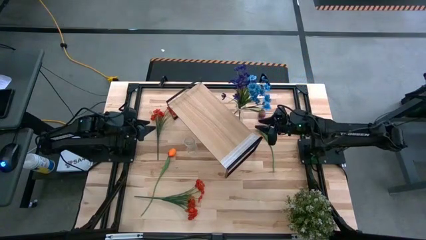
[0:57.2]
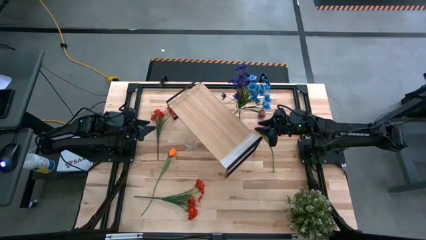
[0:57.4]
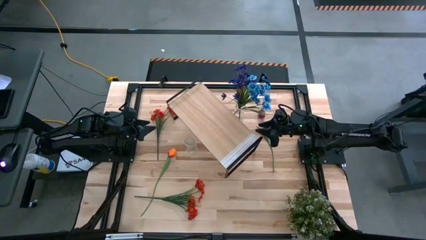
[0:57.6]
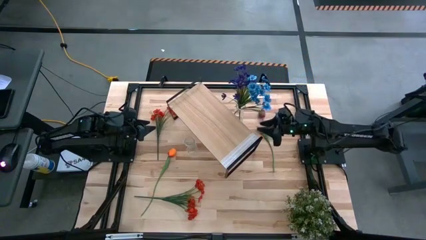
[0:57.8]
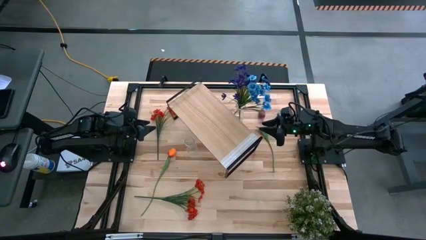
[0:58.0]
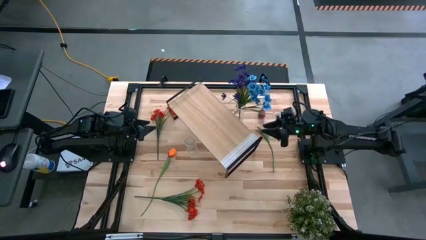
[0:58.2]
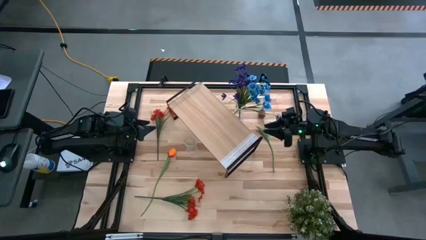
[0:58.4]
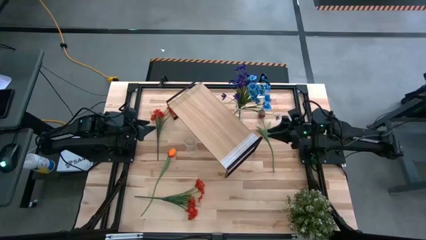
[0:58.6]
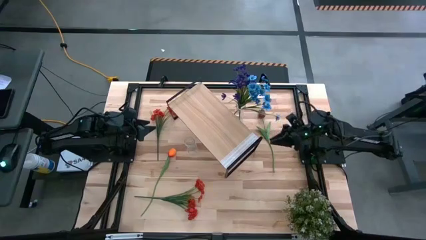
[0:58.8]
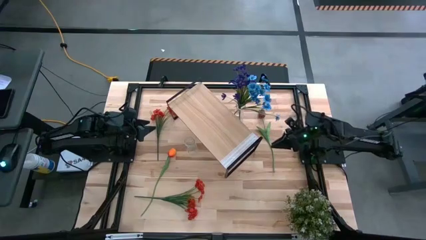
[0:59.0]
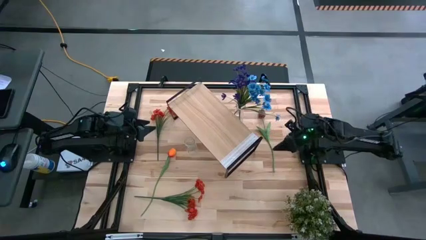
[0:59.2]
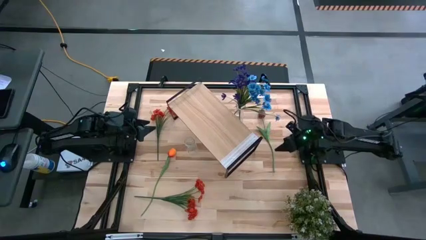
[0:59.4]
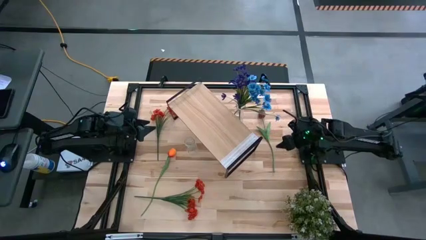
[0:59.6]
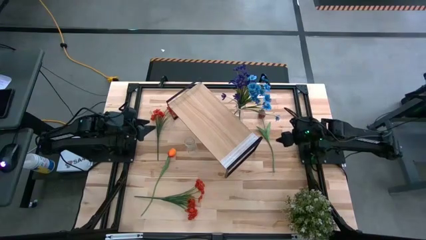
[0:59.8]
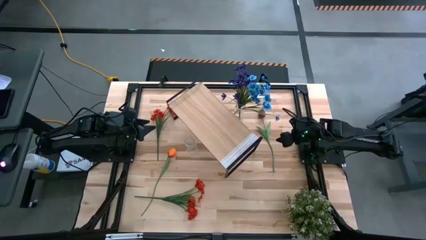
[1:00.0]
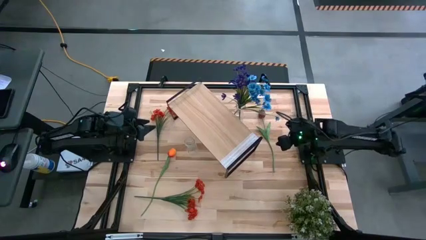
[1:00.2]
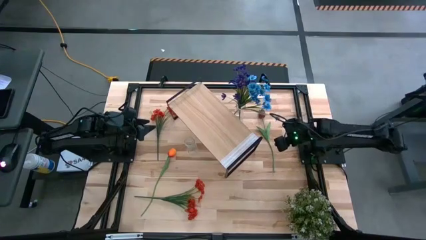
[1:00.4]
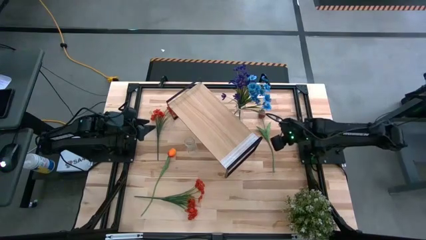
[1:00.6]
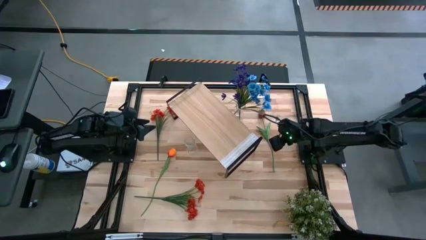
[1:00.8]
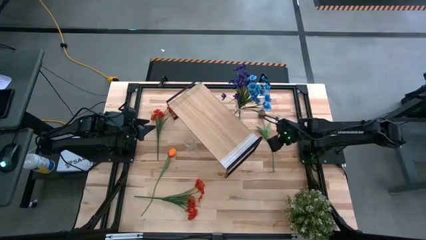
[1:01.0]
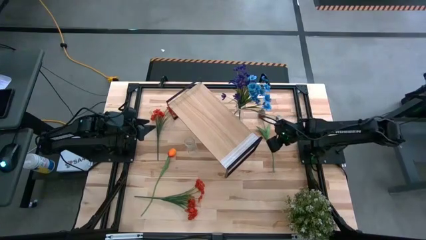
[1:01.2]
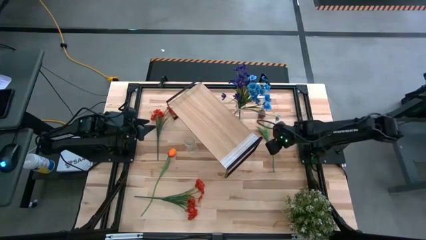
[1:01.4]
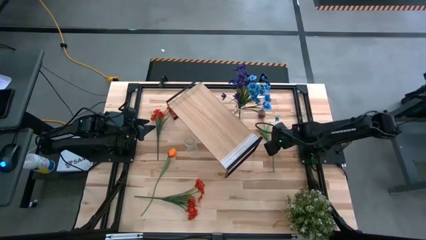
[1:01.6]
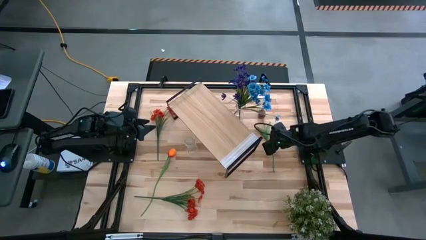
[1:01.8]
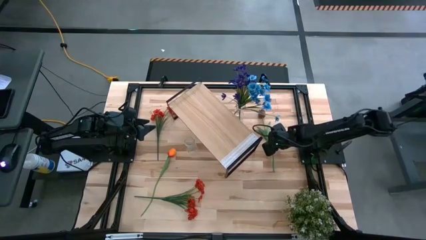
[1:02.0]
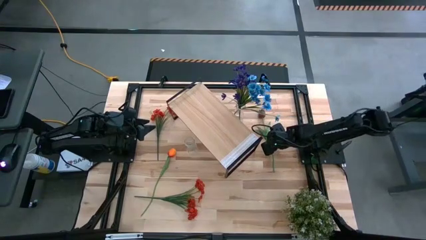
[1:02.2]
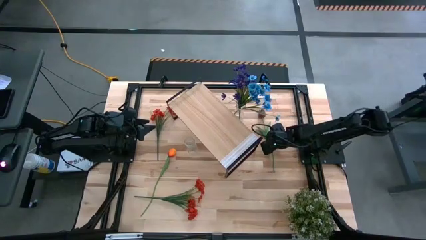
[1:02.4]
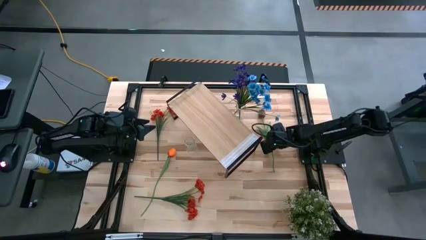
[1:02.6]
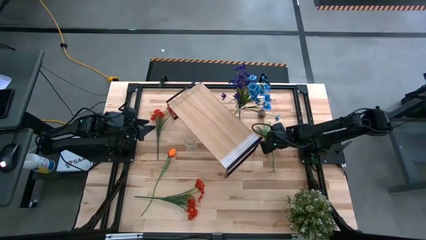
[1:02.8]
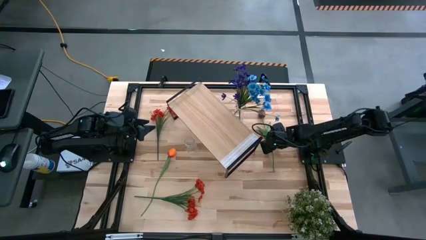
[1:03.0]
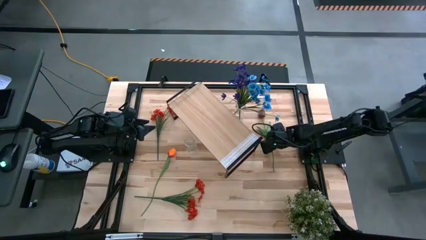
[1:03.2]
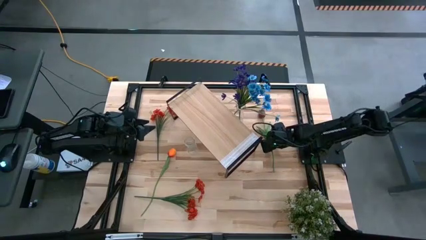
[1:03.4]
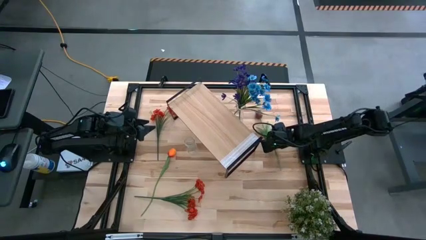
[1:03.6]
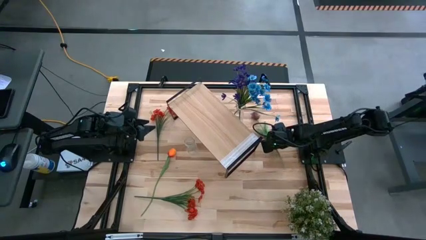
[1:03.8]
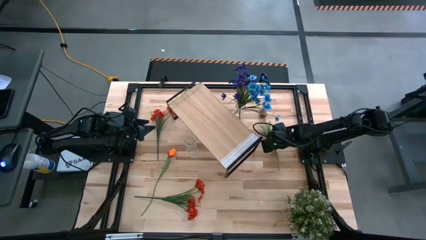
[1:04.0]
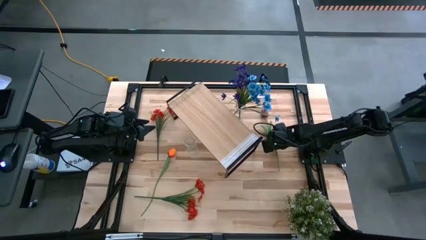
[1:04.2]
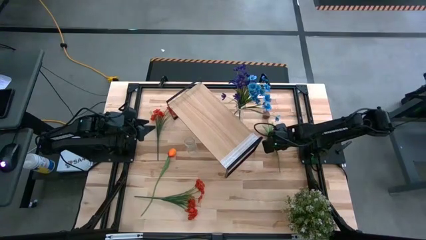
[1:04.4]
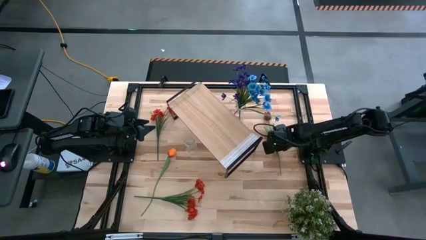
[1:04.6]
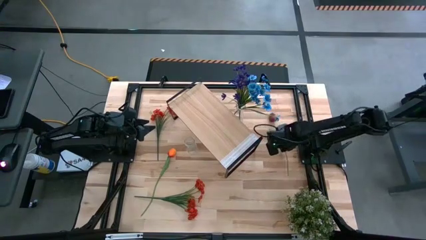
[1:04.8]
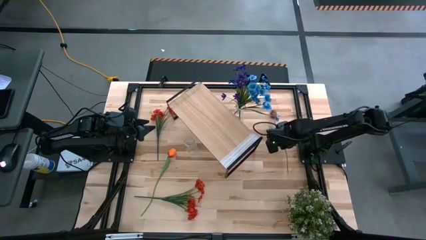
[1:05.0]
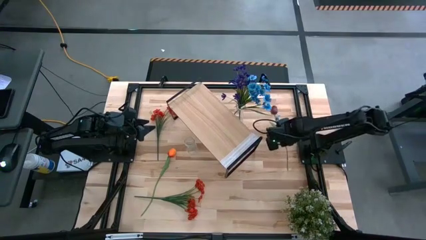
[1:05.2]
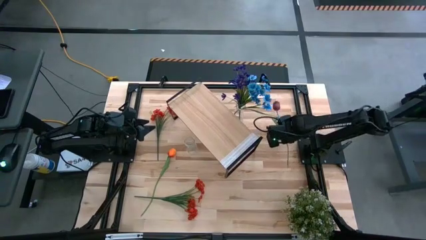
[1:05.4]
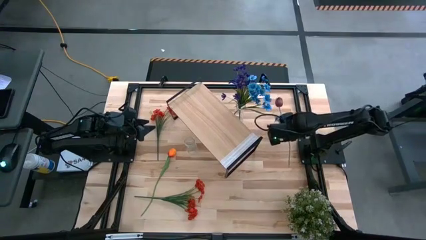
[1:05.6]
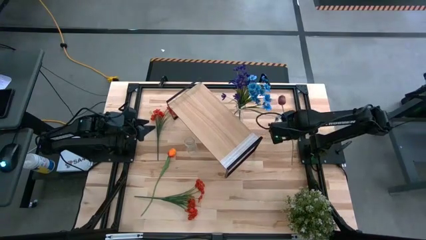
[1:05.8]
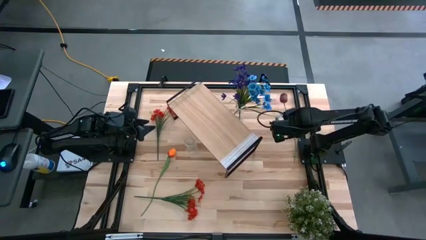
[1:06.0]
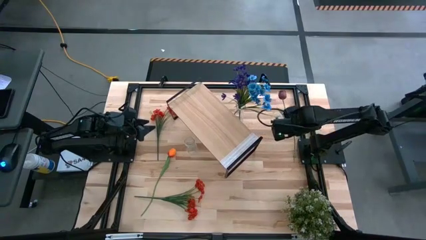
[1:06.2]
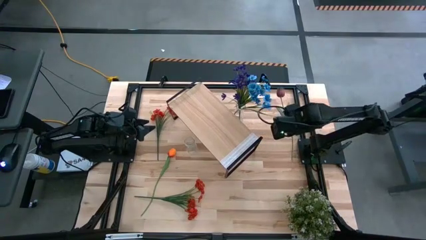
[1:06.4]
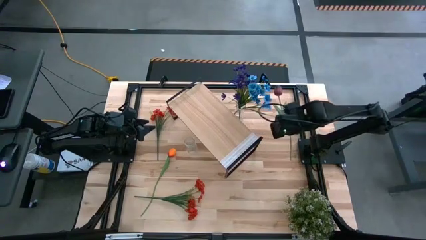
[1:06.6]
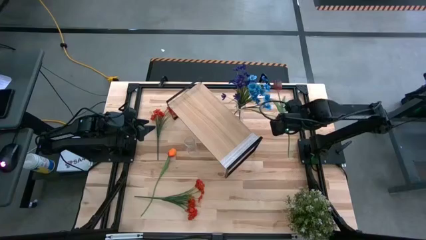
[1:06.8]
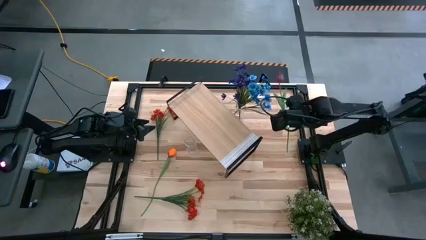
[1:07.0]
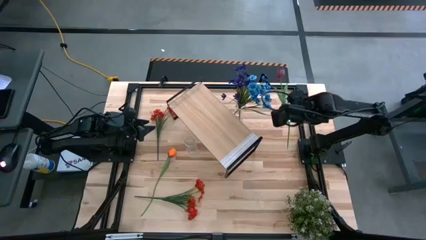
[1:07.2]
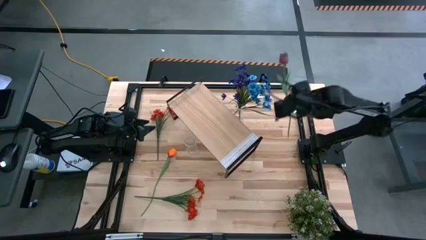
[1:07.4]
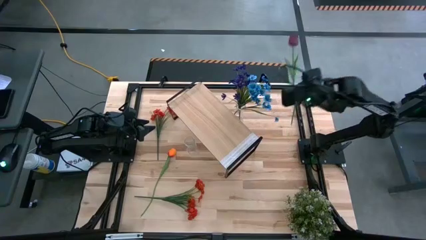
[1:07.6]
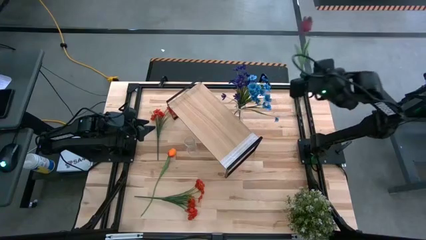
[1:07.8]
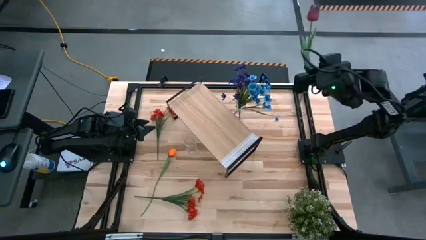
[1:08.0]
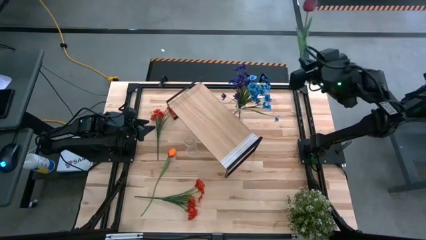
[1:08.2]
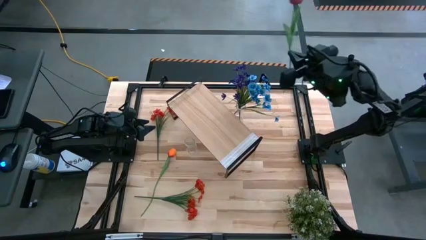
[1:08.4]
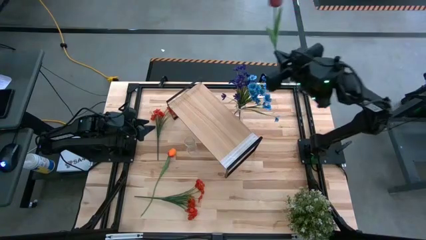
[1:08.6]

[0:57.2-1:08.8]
Task: Pick and place flowers into a vace then onto a shelf
Put the red flower into the top transparent vase
